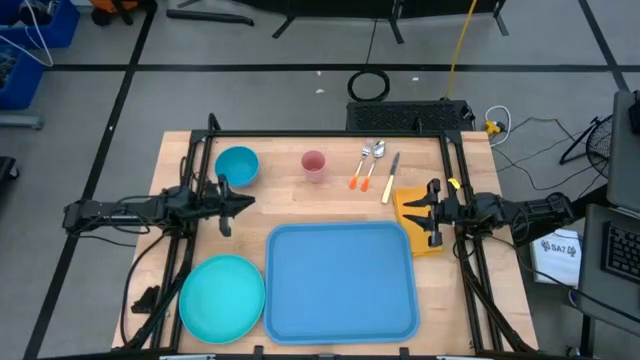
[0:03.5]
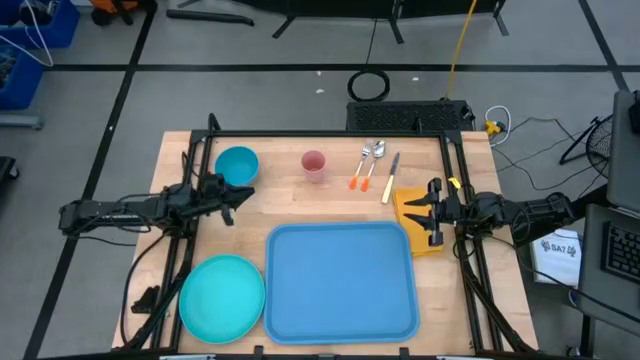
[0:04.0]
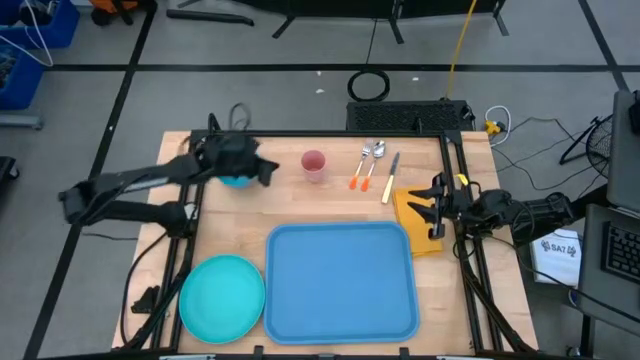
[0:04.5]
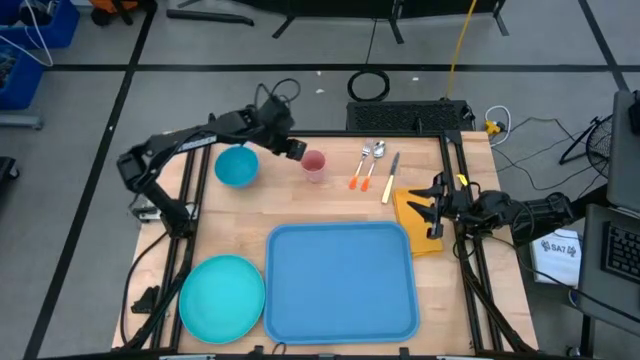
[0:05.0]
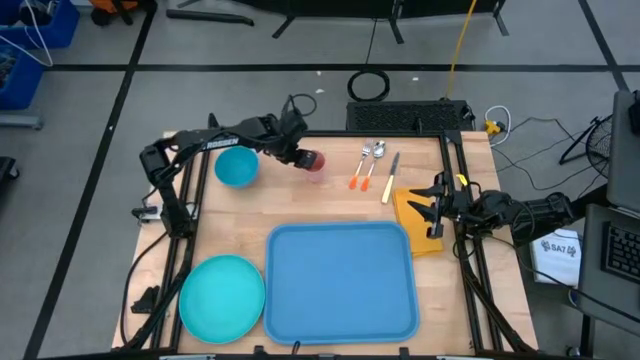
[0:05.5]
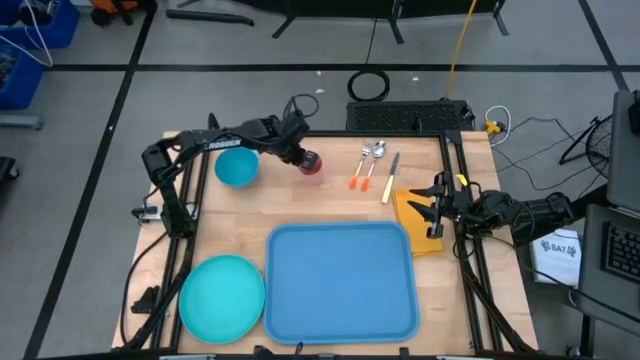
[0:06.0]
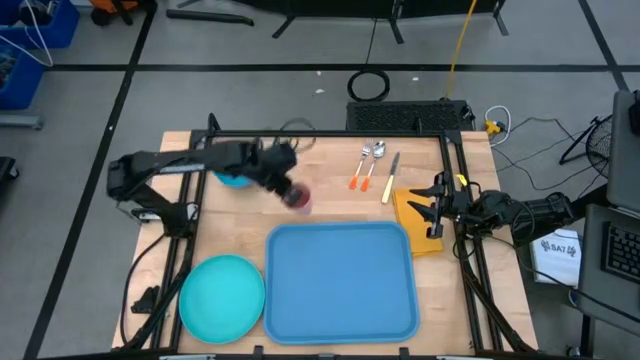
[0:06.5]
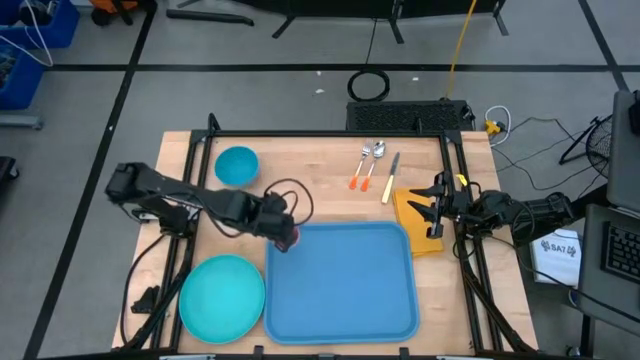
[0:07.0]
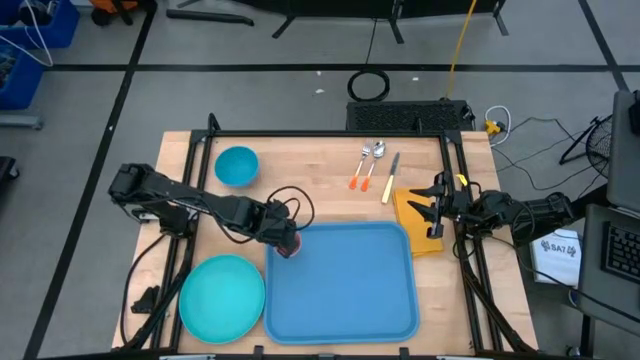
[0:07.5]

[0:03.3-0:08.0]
Task: Set up tray
Put the pink cup on the blue tray

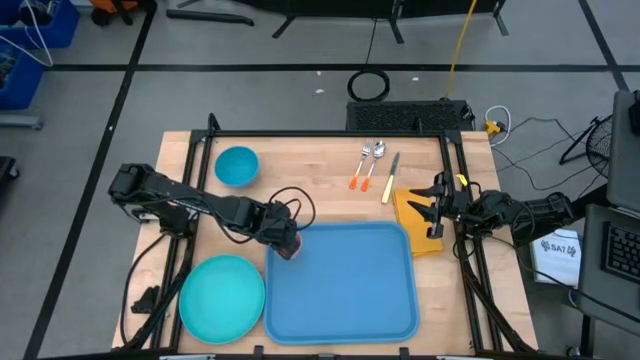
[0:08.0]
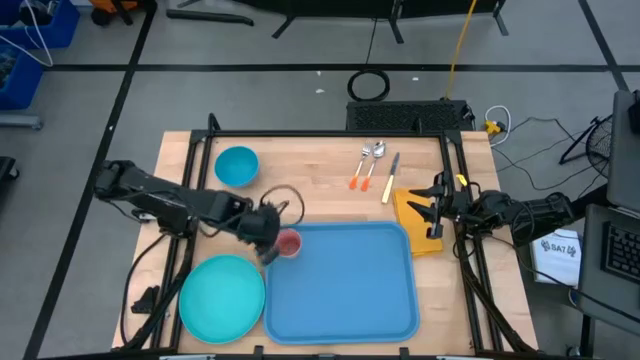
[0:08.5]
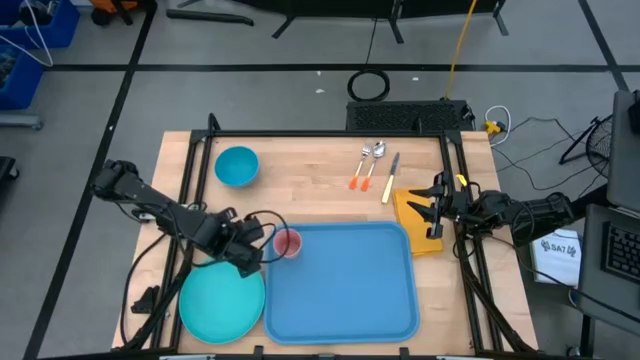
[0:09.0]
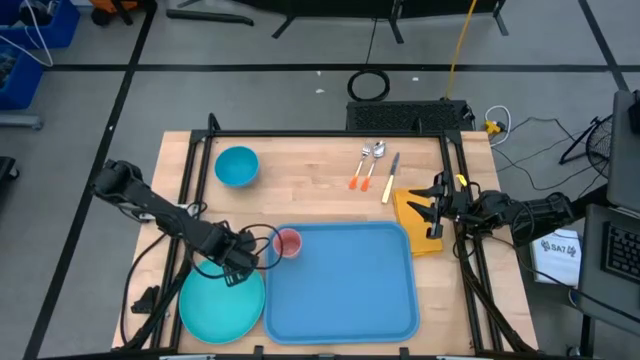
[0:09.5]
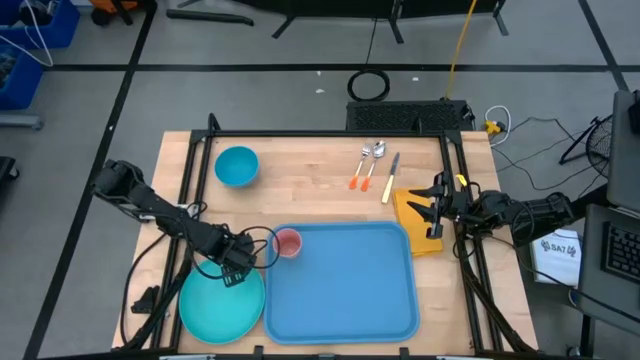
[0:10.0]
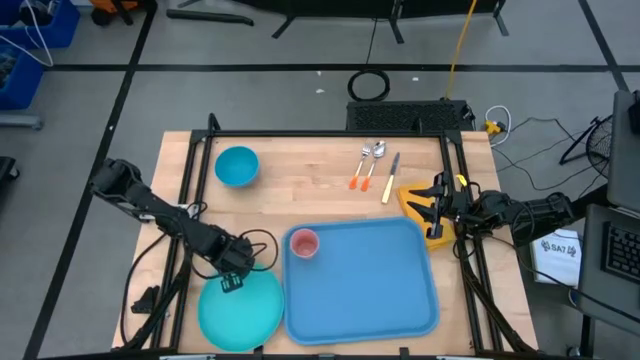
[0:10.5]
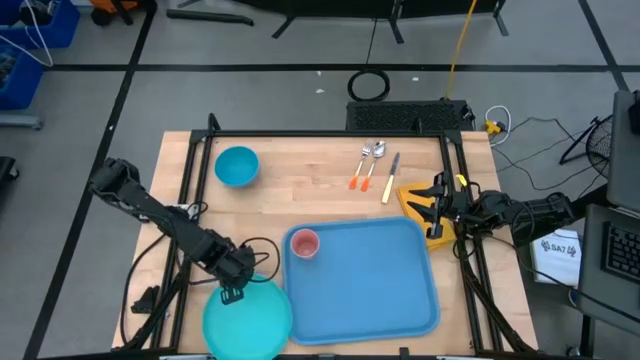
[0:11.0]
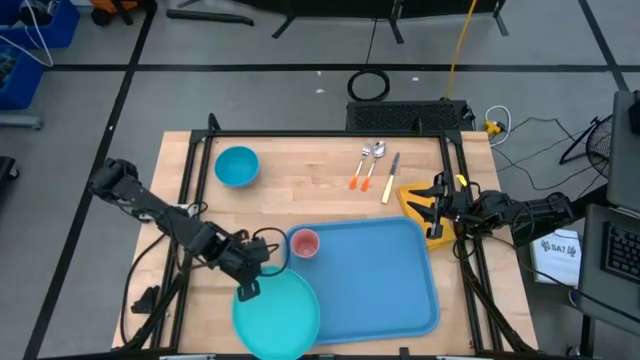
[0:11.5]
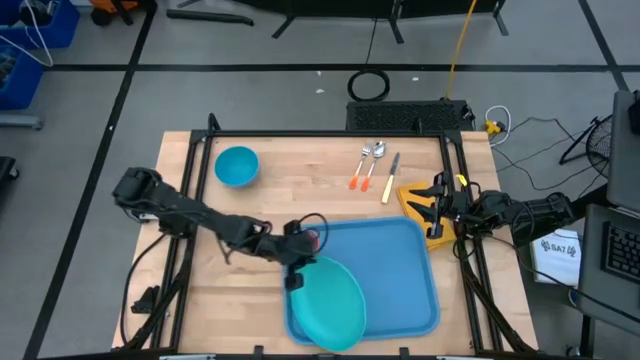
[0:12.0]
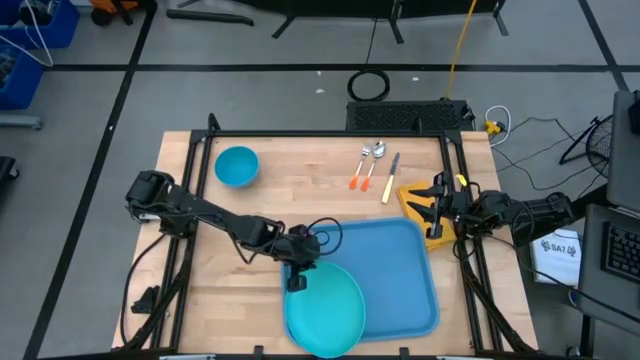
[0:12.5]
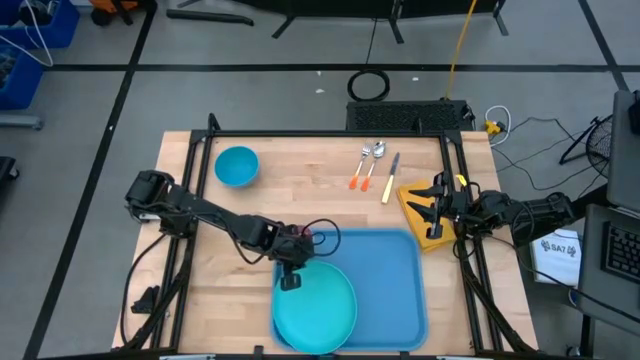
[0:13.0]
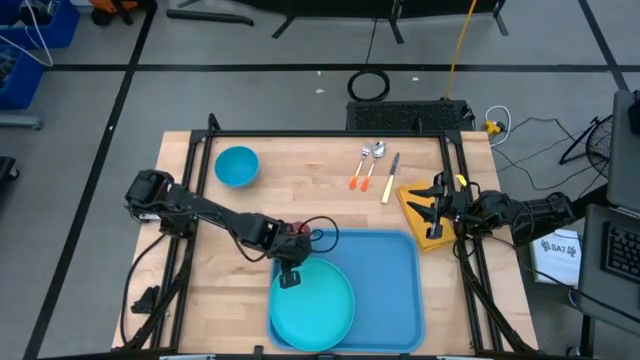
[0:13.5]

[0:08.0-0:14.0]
Put the light blue plate on the blue tray

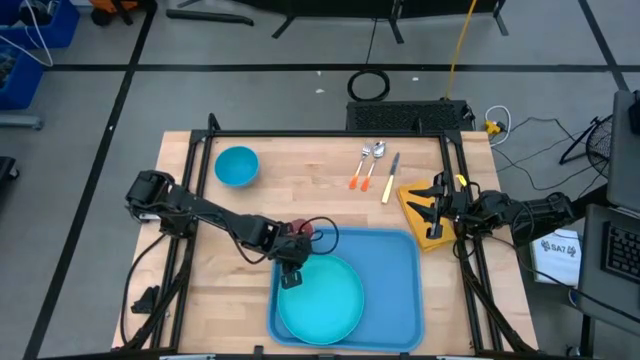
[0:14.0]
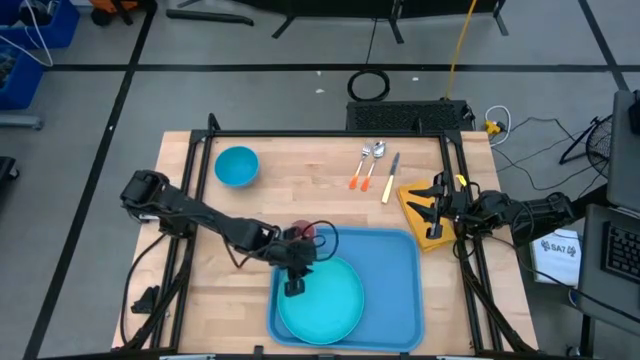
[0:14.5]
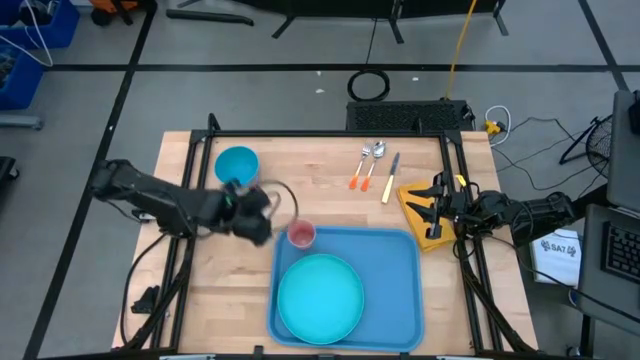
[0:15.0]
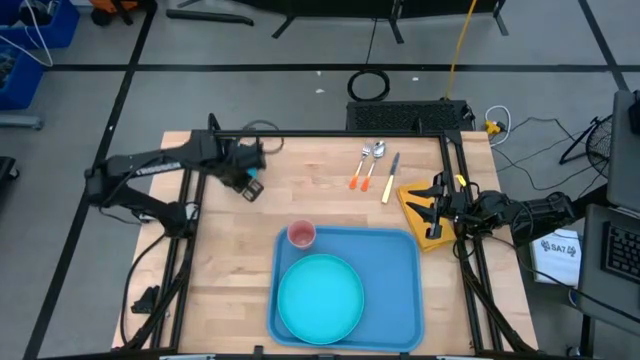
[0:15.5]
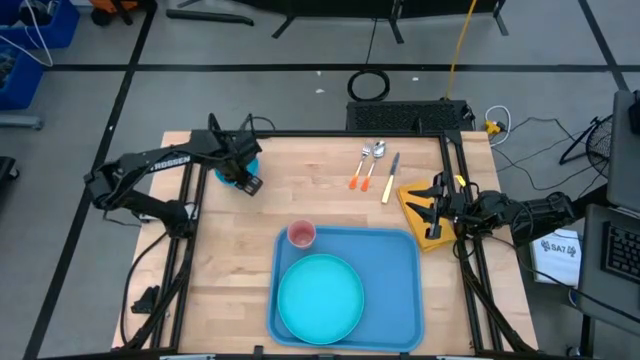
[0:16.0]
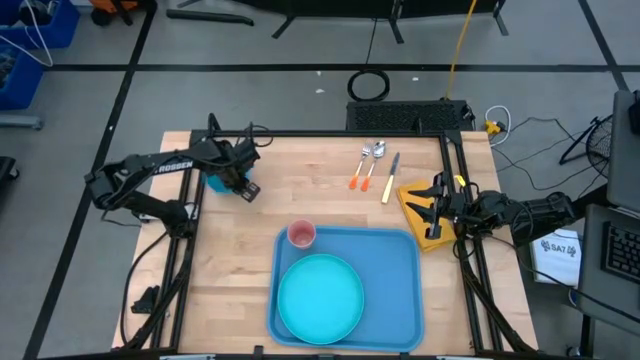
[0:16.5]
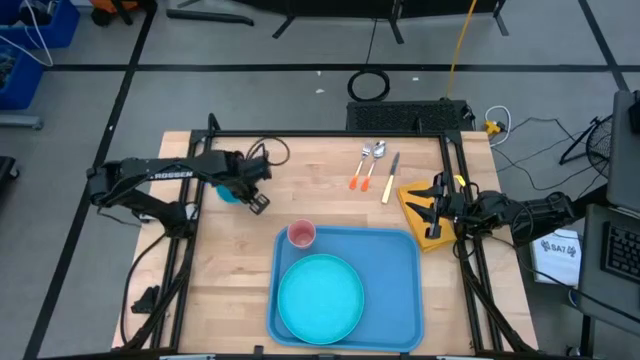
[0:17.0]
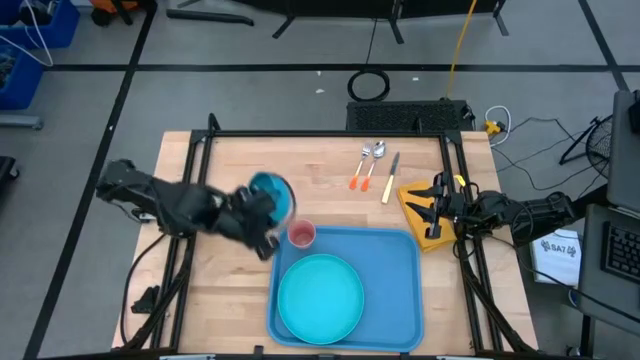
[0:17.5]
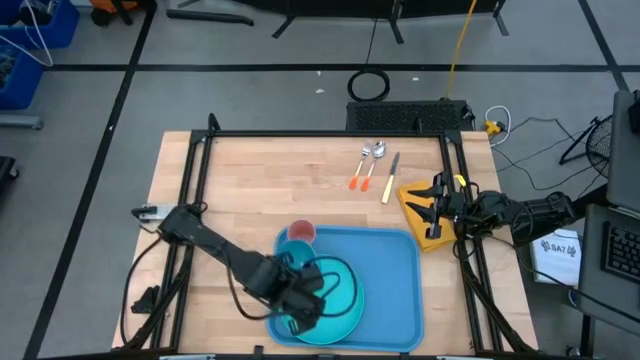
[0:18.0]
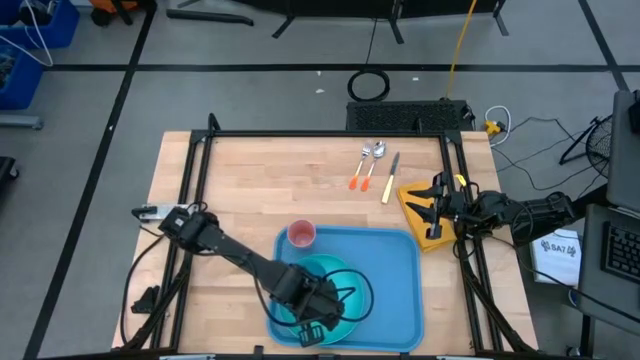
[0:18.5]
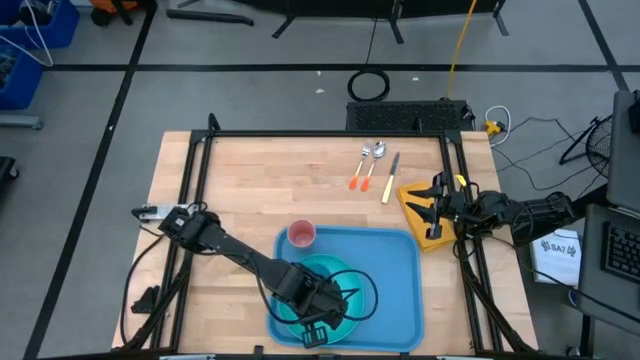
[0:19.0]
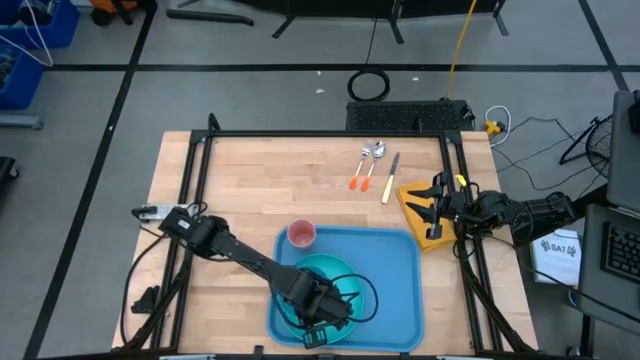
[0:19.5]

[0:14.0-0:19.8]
Put the blue bowl on the light blue plate

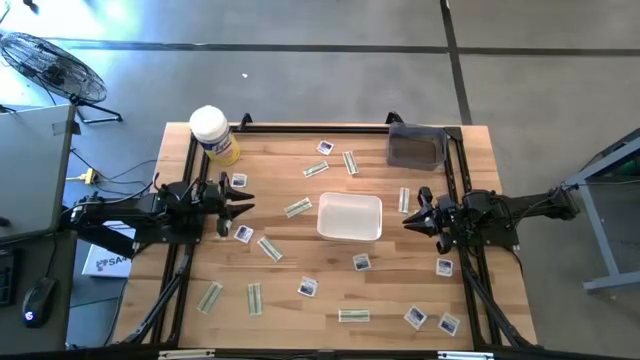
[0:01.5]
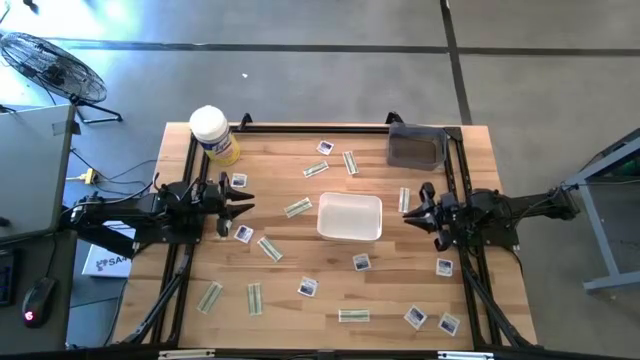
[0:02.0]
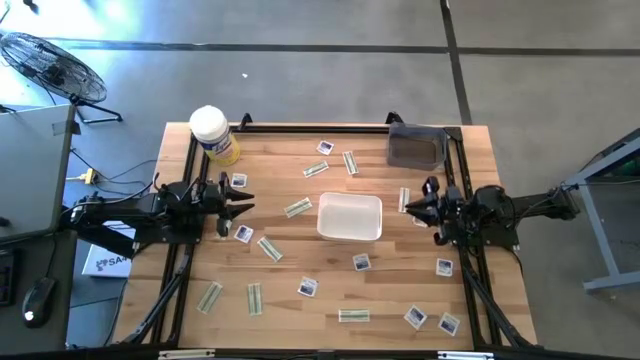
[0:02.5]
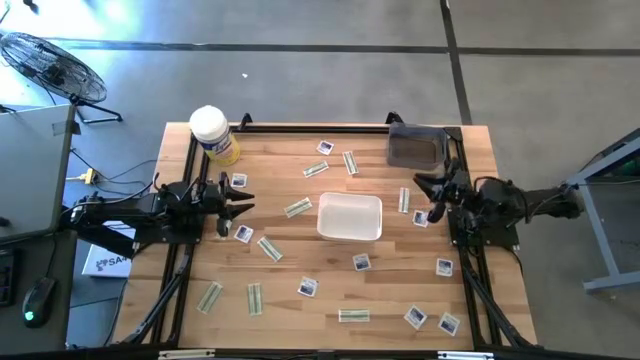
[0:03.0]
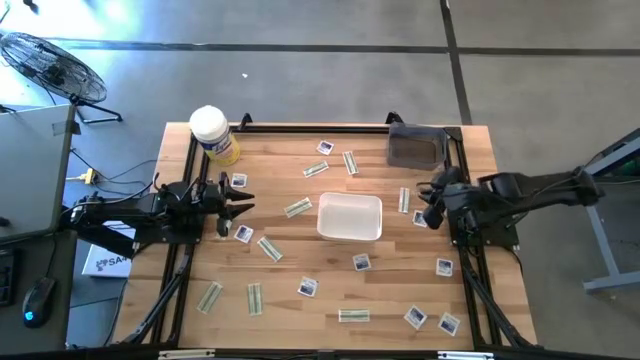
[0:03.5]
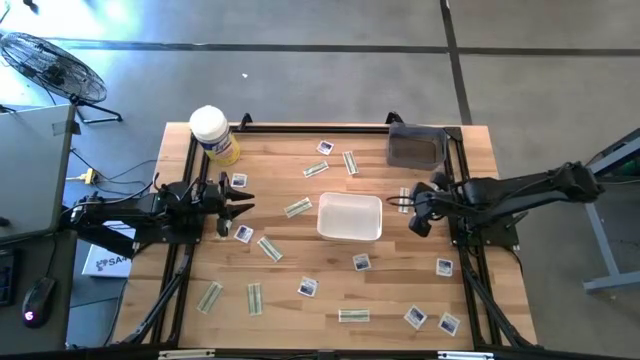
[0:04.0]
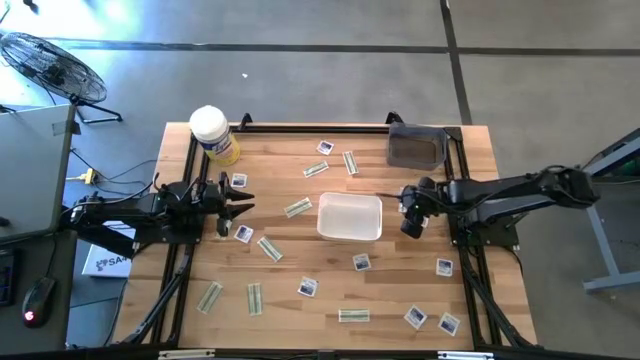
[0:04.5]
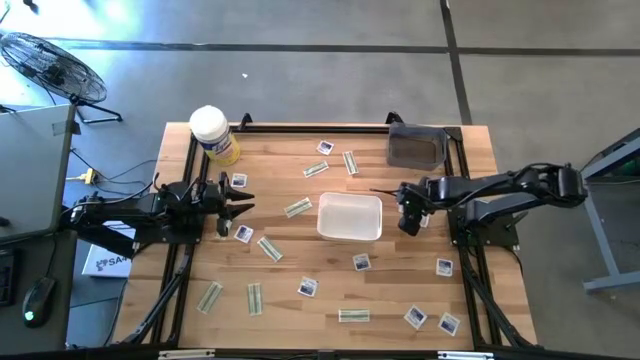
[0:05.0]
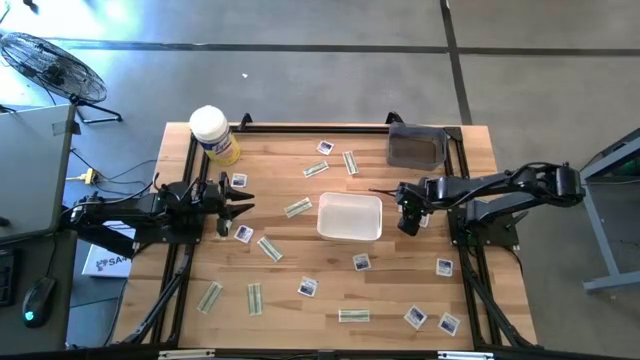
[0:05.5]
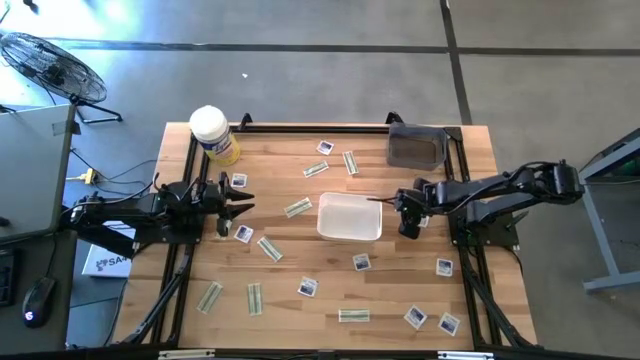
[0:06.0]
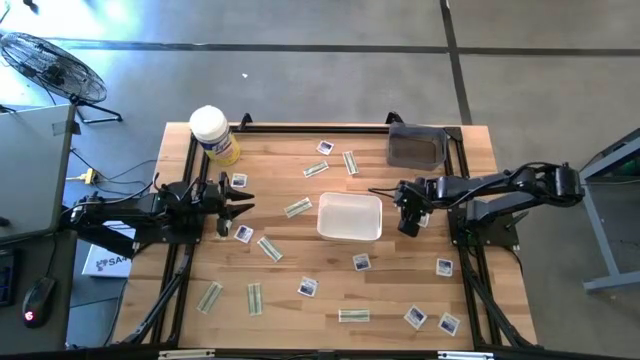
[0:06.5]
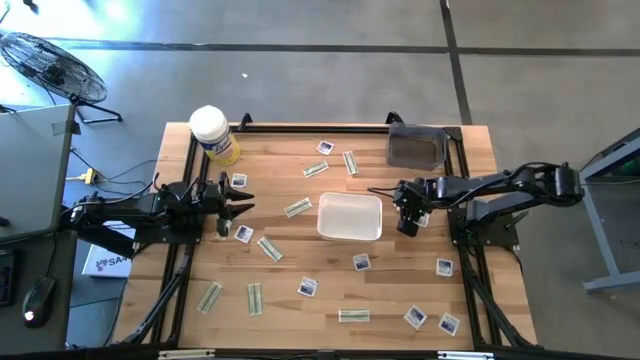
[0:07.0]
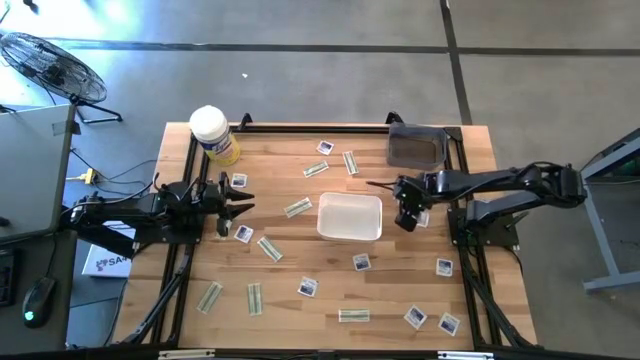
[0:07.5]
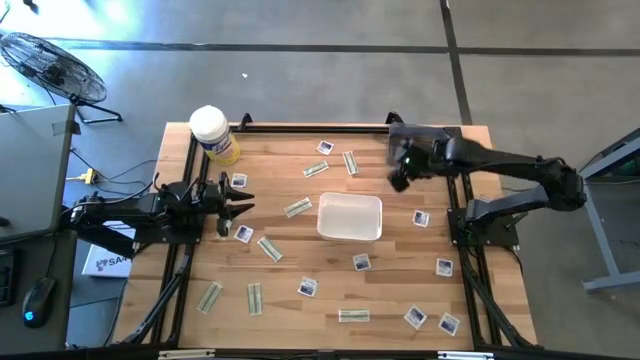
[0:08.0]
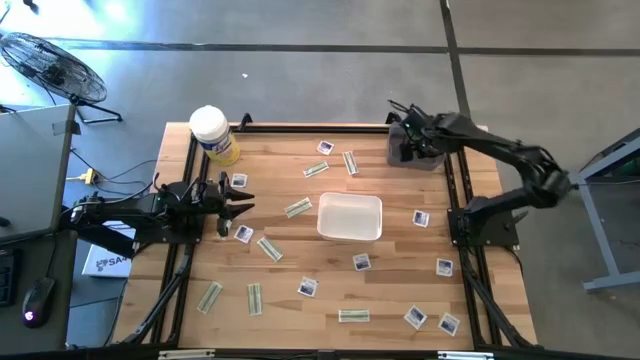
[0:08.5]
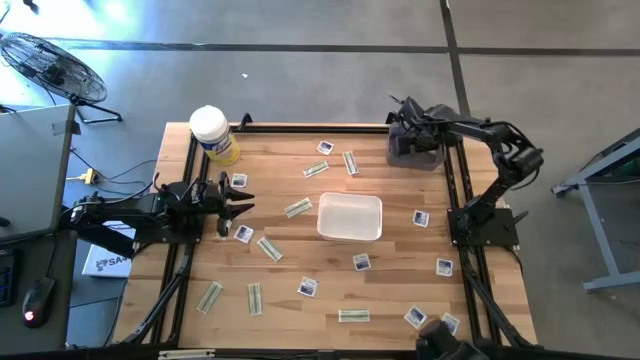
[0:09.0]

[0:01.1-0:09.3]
Task: Pick & Place First Aid Supplies
Put the green bandage into the black bin
